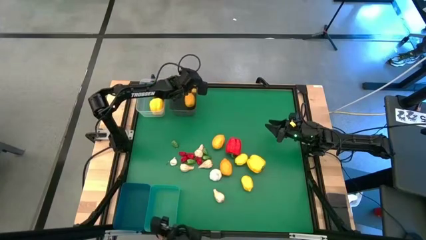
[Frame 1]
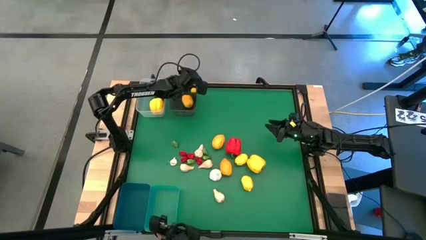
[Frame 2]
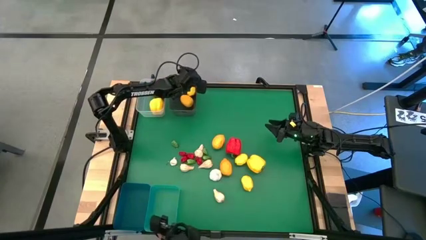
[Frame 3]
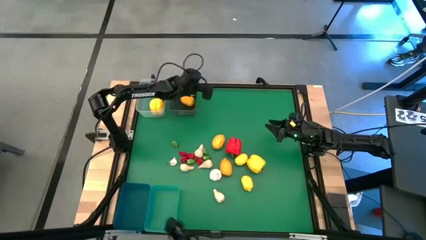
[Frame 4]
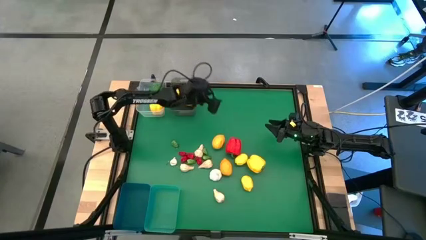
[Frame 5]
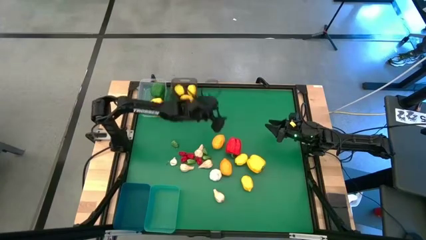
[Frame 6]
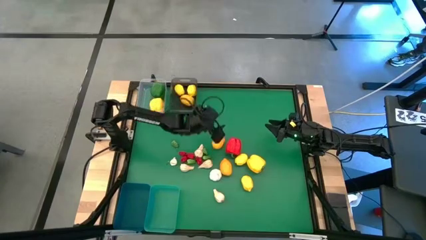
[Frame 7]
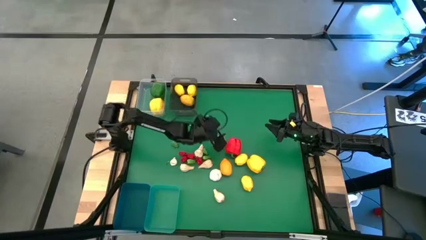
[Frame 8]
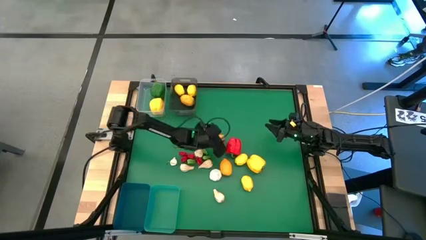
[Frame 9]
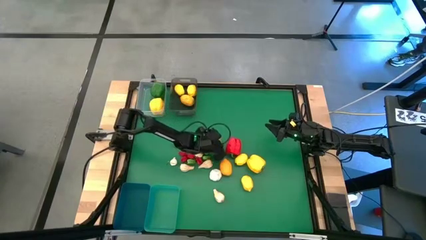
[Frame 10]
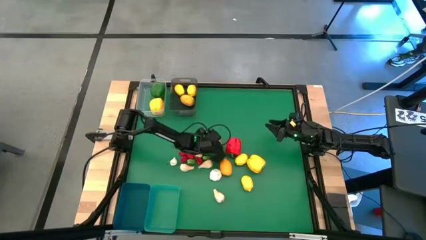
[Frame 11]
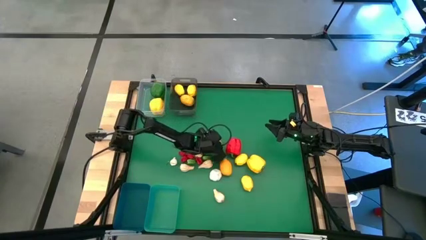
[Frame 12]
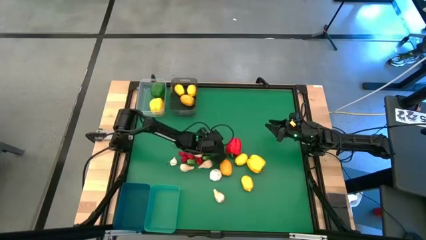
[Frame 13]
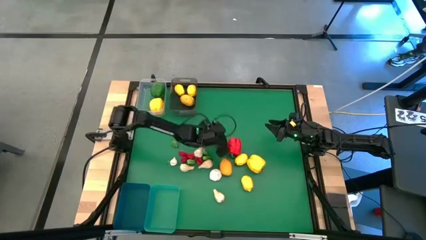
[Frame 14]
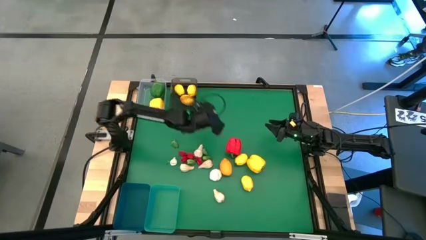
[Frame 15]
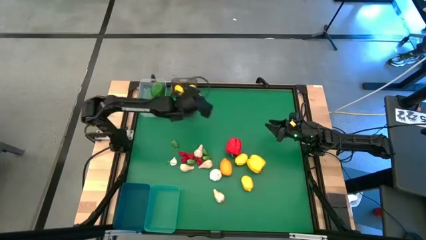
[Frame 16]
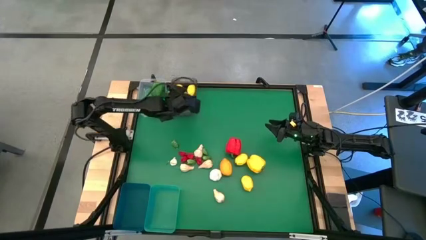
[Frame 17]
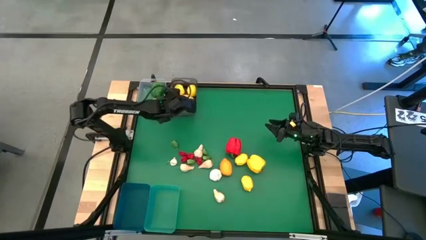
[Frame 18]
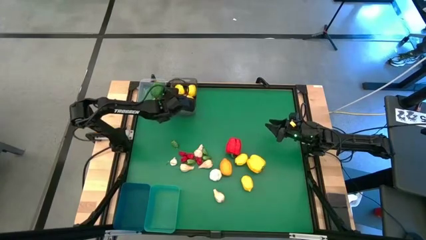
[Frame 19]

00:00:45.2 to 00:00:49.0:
Task: Sort produce into baskets
Put the lemon into the black bin

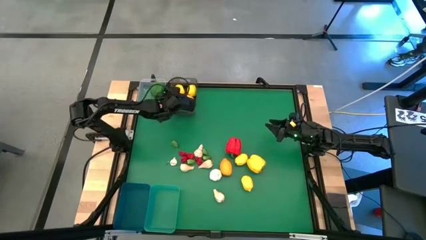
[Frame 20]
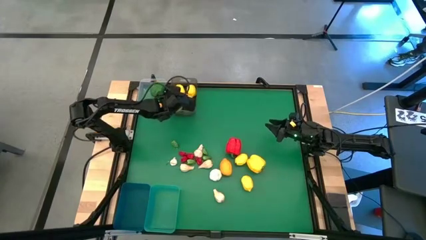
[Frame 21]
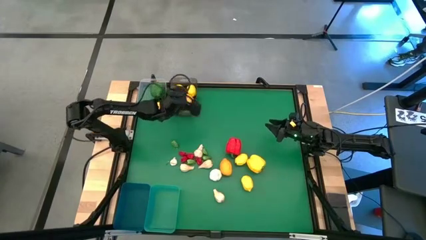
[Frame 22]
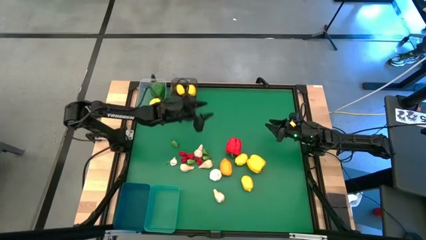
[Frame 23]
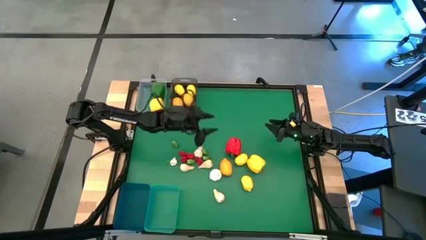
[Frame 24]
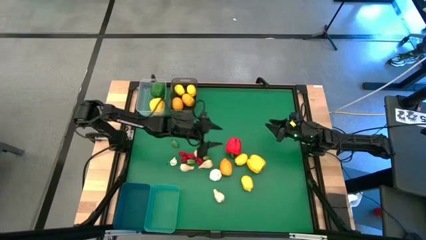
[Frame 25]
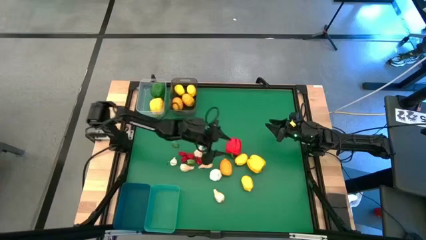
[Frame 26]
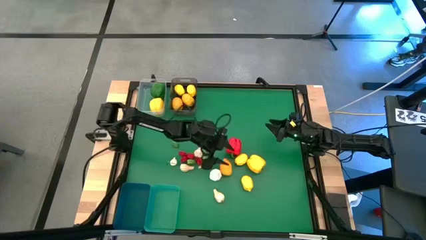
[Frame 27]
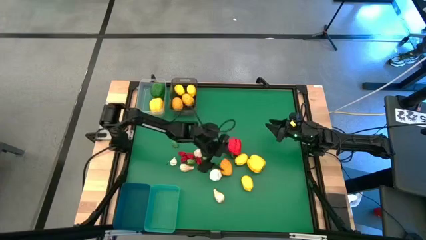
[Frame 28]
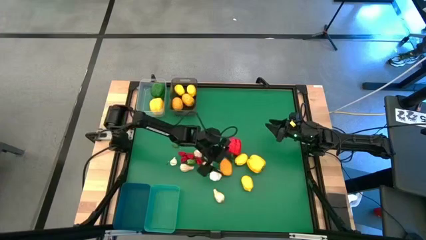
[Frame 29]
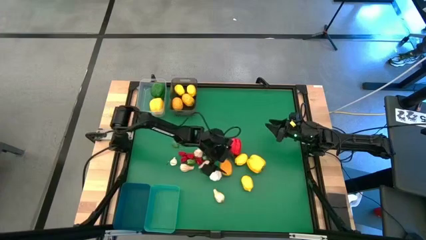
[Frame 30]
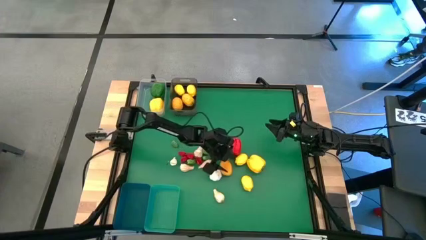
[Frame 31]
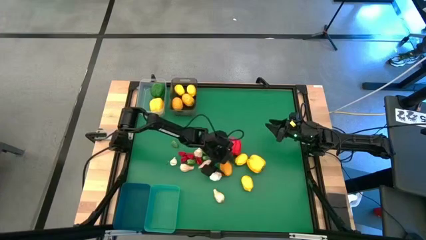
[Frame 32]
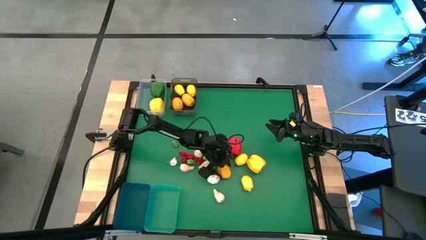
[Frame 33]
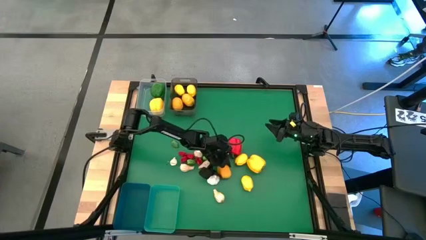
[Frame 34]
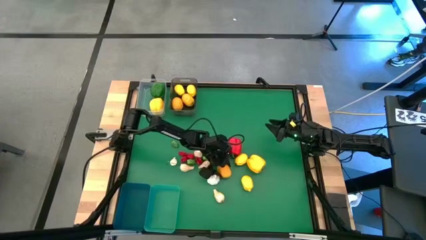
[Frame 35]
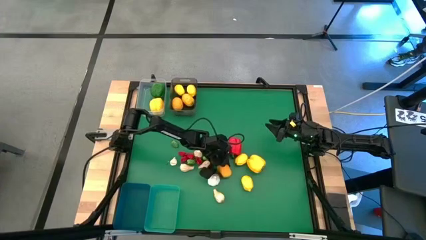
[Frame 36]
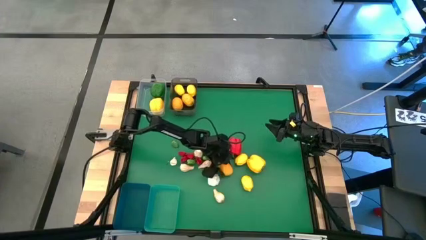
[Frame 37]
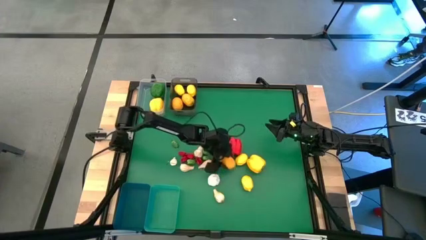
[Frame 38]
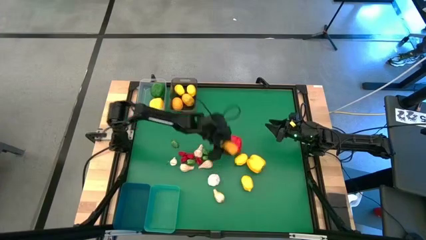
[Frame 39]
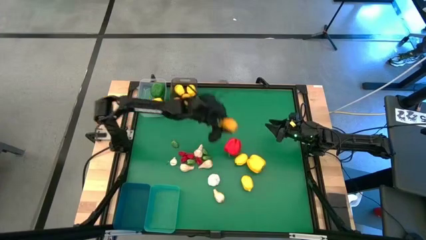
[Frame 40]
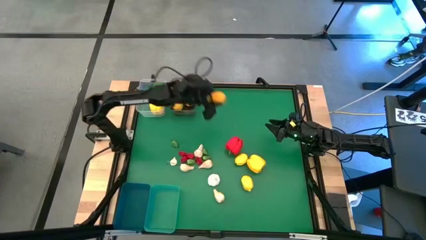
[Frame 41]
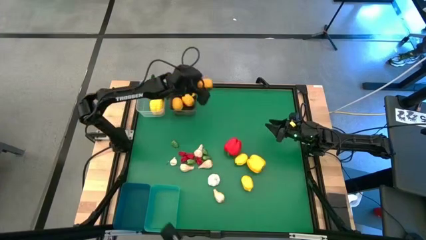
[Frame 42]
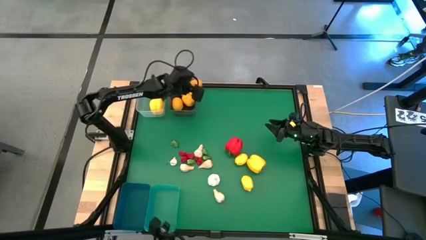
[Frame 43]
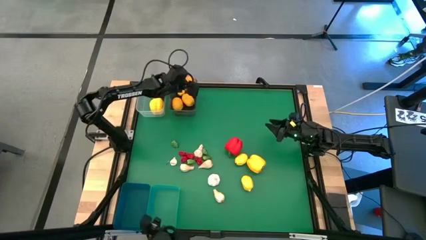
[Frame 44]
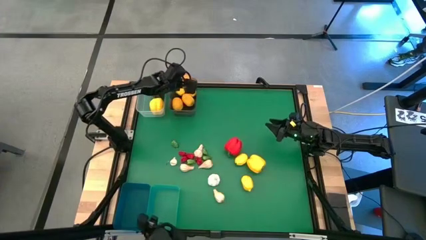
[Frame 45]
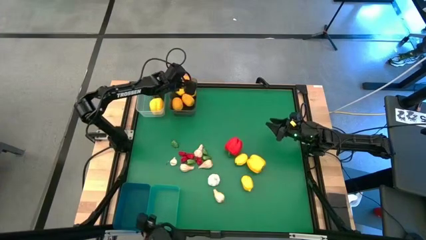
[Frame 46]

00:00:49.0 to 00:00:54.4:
Put the lemon into the black bin

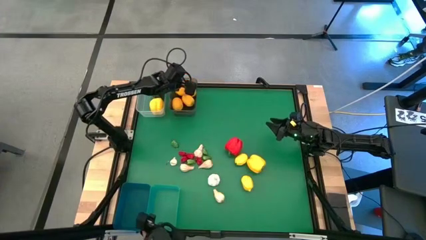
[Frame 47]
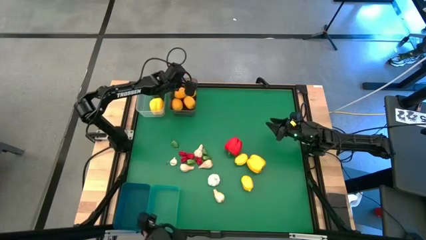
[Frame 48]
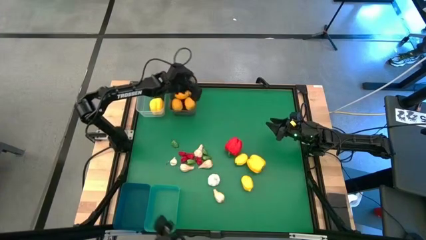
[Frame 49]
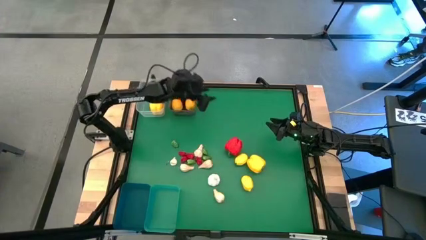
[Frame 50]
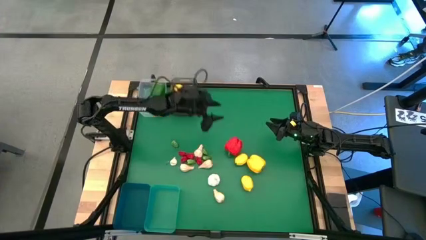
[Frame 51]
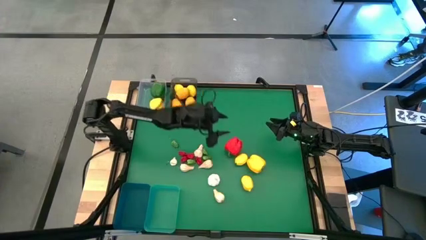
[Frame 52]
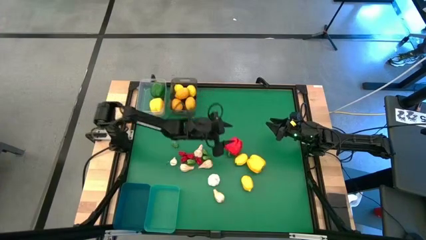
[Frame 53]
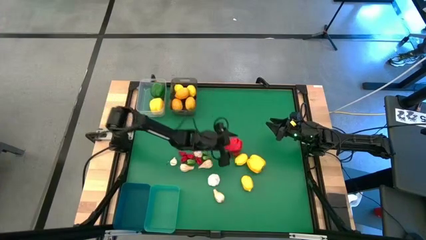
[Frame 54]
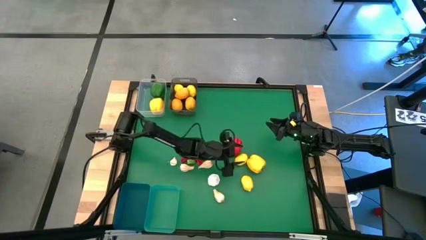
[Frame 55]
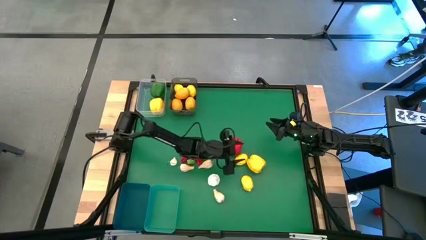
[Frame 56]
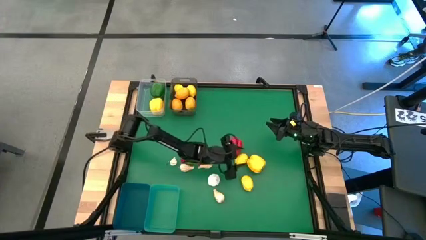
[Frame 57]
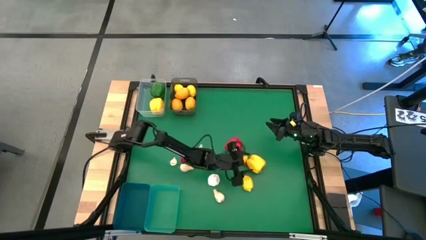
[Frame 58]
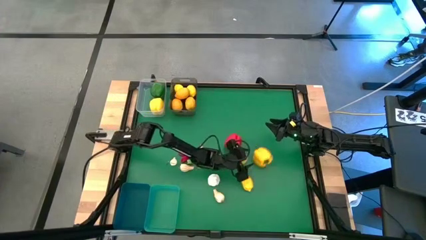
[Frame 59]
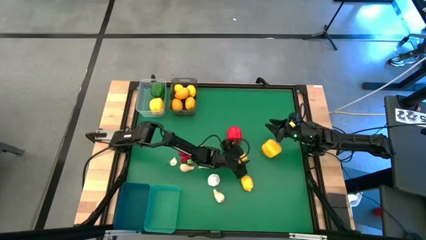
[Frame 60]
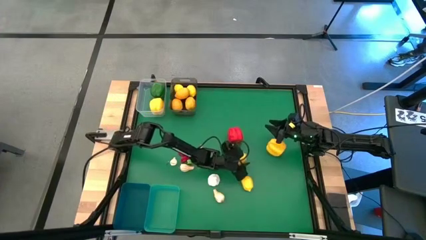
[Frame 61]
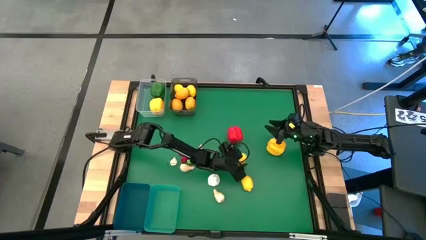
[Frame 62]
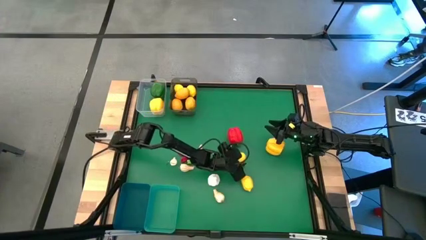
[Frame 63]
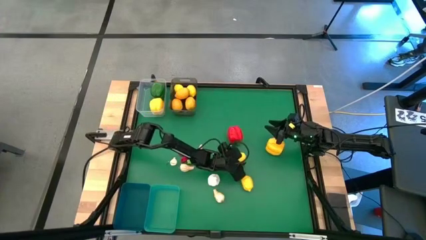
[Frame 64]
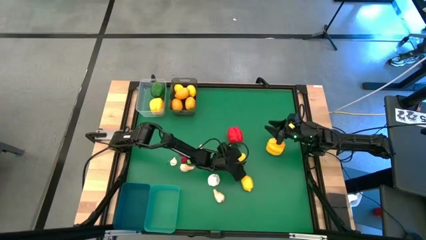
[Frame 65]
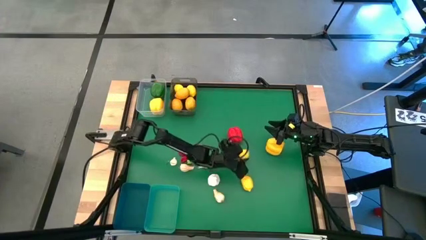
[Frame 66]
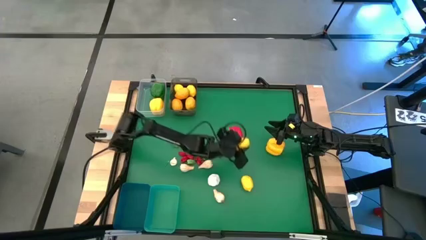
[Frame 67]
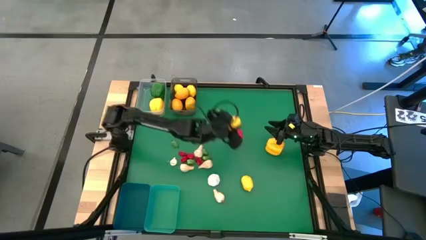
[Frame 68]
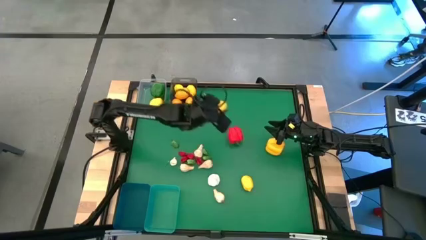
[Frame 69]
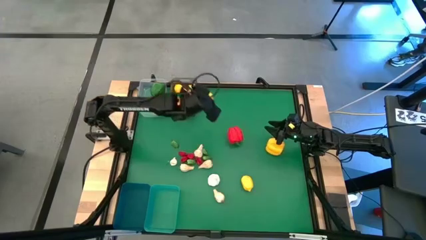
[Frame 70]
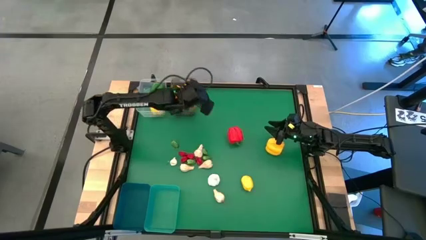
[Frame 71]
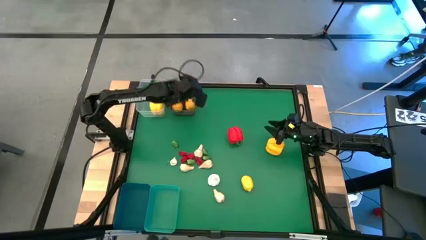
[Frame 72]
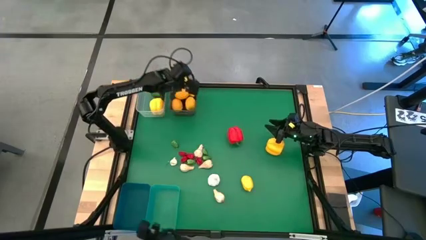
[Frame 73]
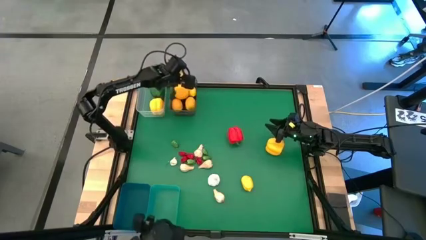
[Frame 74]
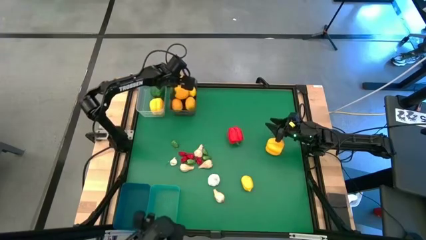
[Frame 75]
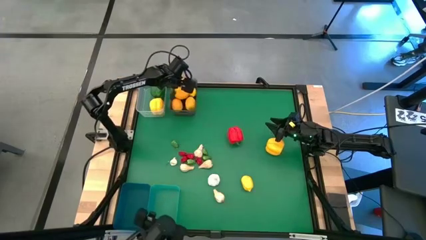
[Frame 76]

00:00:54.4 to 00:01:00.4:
Put the lemon into the black bin
